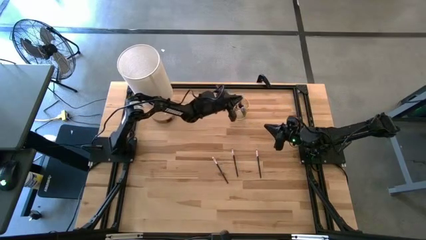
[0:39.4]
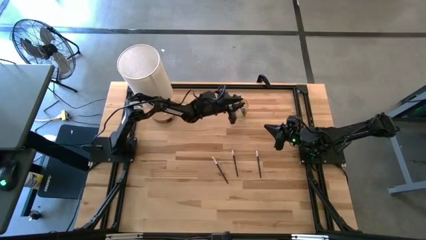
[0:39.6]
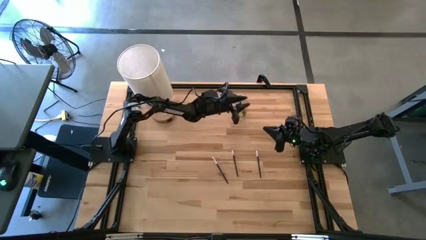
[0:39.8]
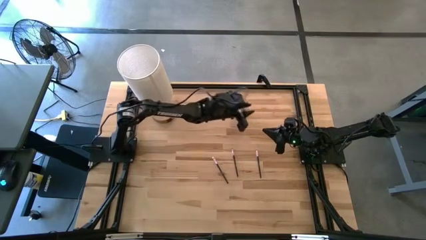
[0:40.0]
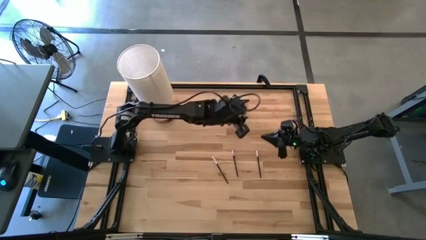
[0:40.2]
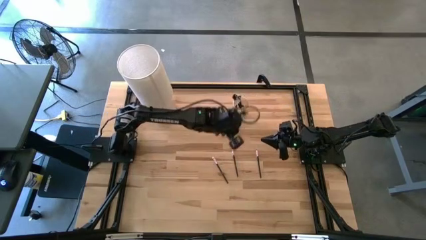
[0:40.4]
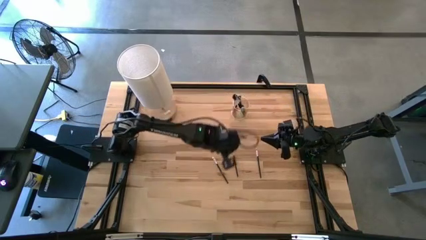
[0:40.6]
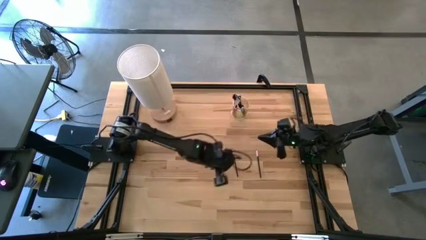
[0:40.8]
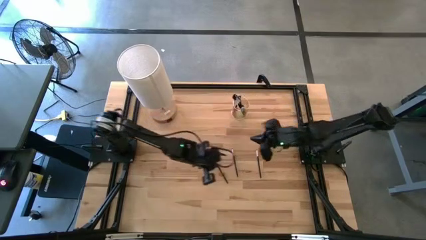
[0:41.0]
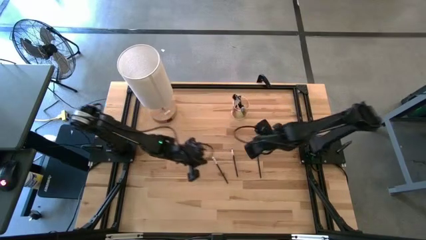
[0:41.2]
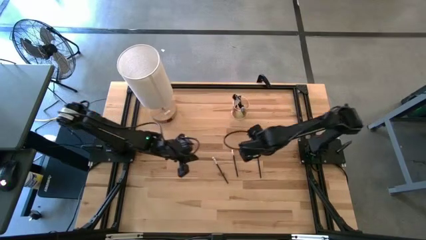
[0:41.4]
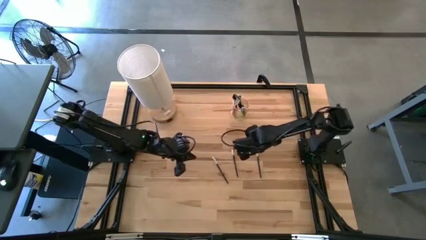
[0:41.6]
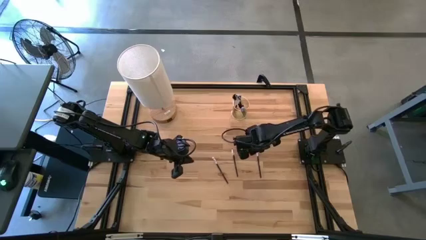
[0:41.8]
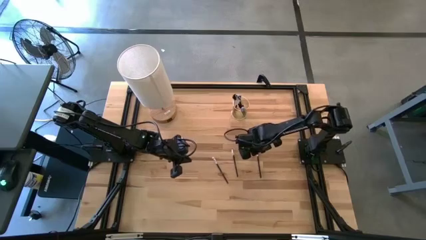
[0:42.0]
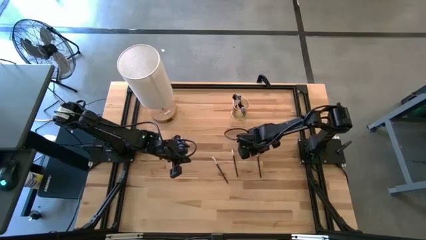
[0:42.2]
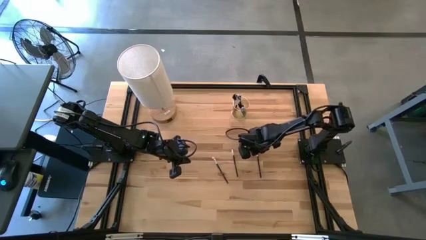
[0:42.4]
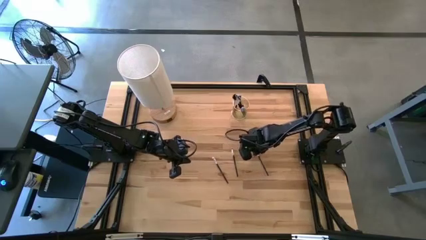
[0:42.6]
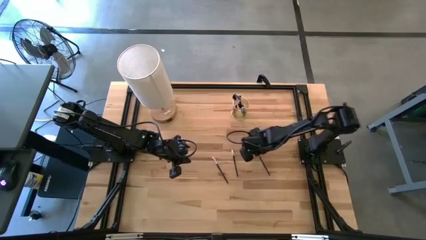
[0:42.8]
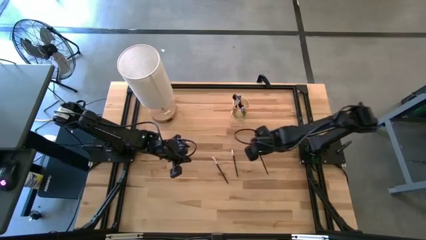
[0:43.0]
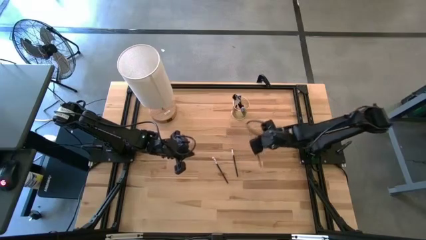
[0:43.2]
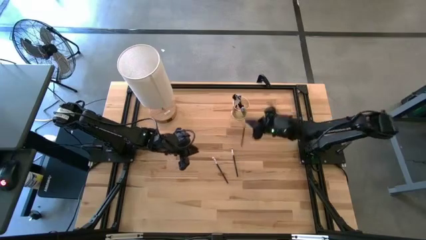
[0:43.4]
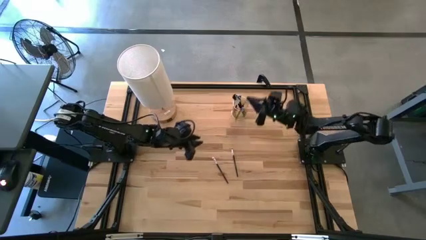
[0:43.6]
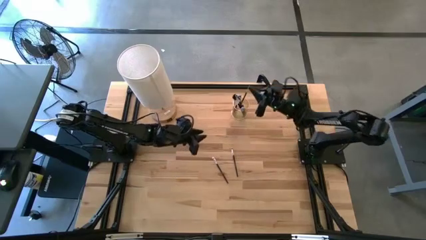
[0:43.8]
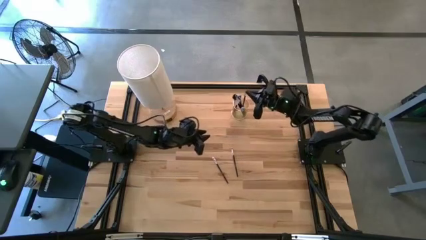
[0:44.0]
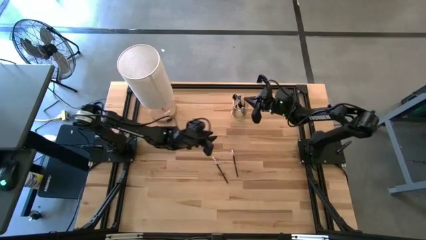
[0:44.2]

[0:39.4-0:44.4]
Task: Put items in baskets/containers
Put the silver eyeshadow brush into the yellow container

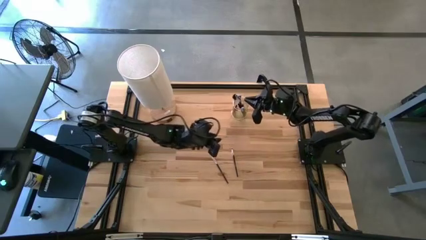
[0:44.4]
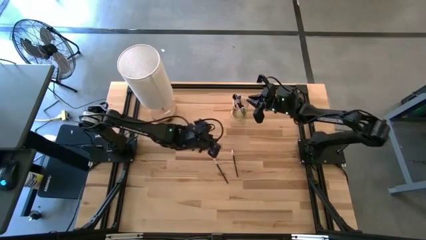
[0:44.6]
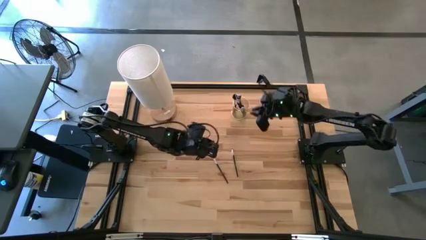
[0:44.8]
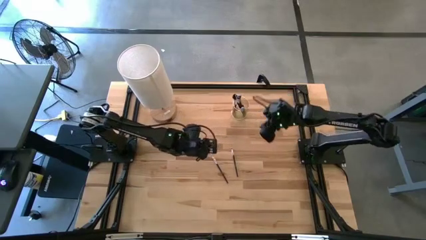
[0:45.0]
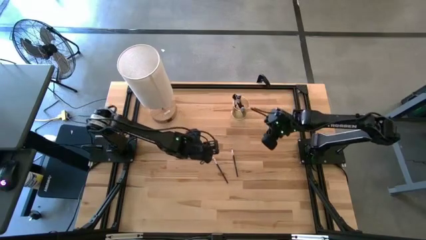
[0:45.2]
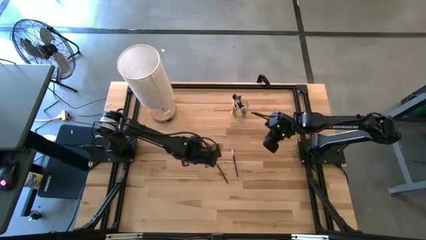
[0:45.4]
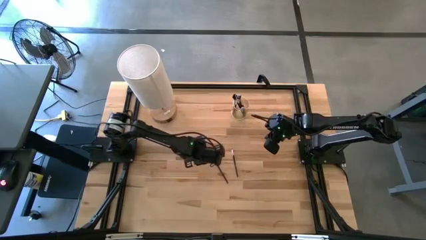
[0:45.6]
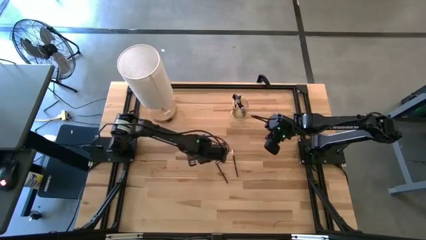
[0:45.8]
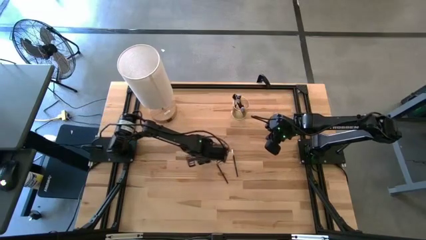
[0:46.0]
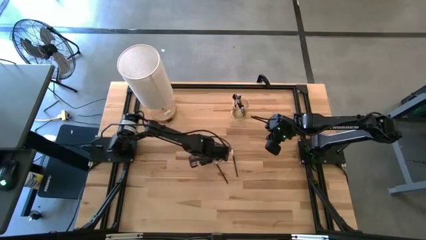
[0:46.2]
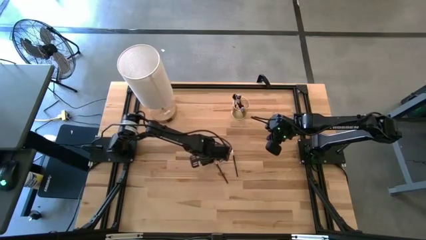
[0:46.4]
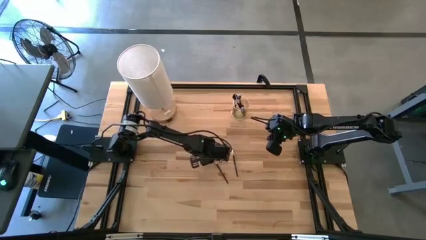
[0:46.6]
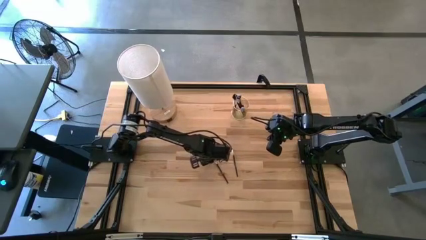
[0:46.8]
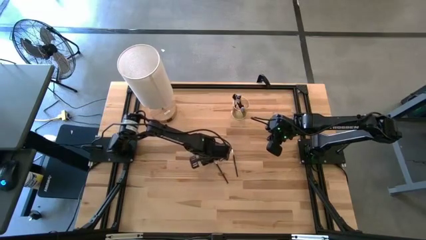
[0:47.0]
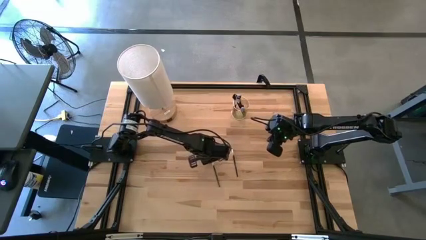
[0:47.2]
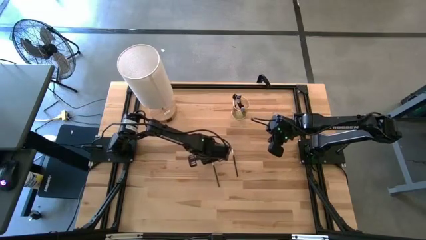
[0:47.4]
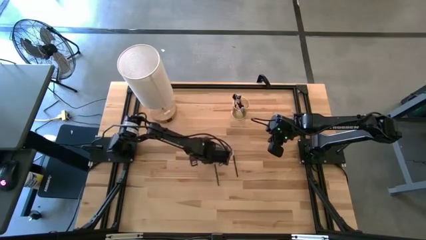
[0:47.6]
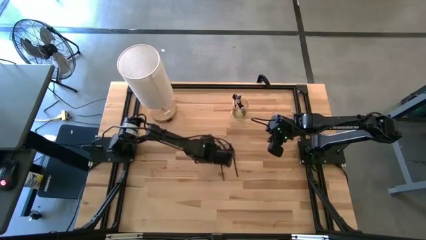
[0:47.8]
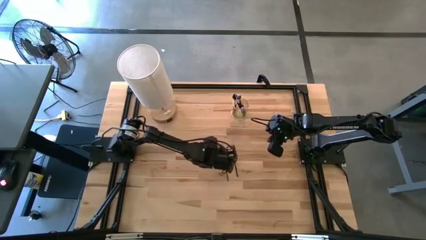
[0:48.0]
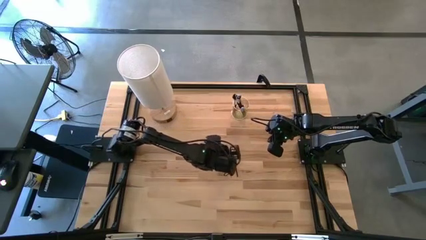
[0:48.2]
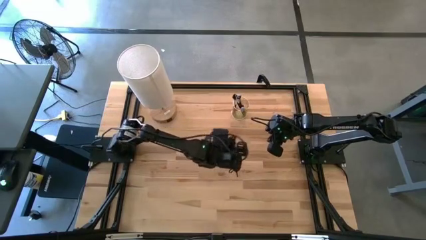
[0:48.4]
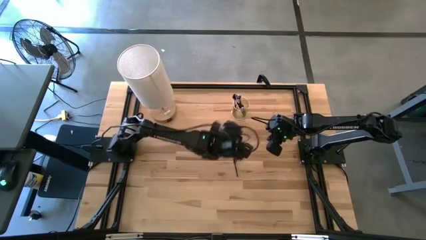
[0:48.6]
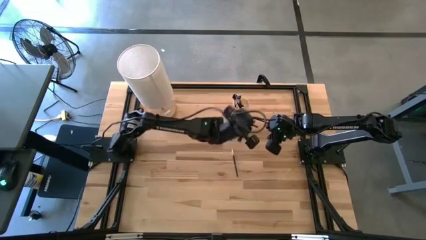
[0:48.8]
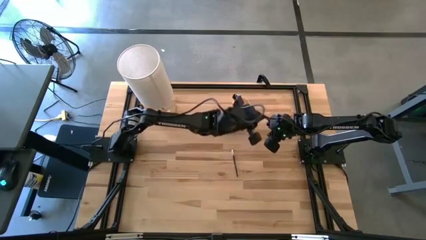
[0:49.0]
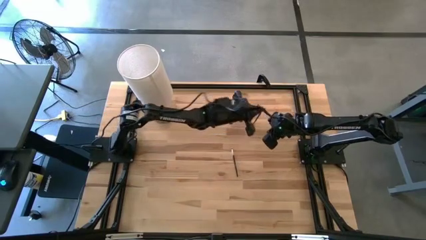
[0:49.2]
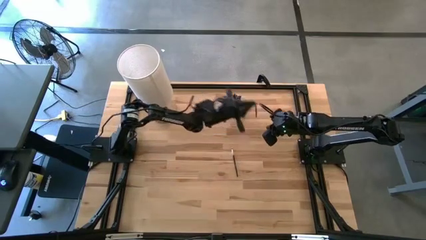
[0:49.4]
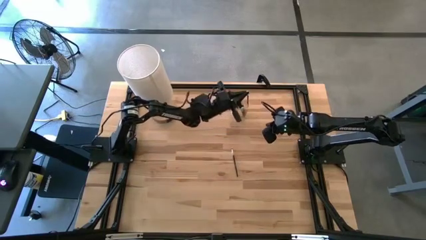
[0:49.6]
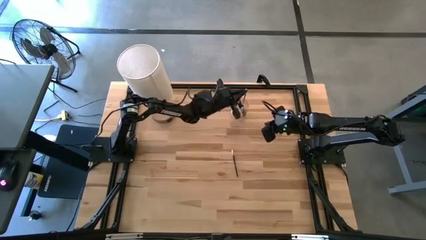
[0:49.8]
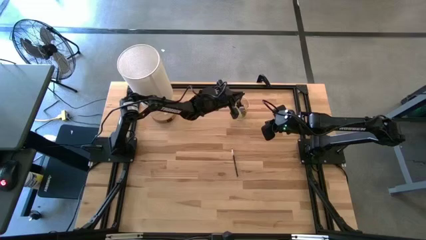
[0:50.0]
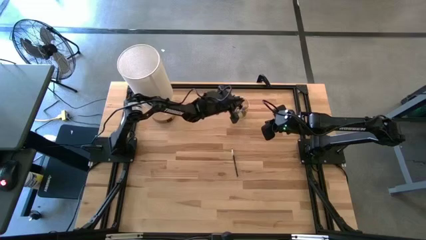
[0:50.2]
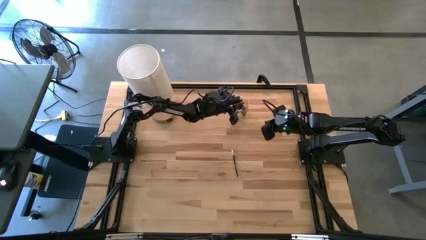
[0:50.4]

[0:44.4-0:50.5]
Put the silver eyeshadow brush into the yellow container

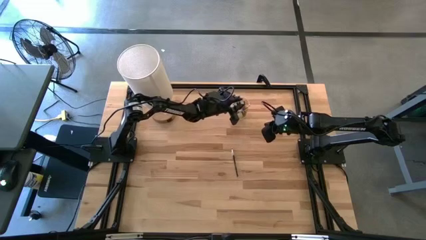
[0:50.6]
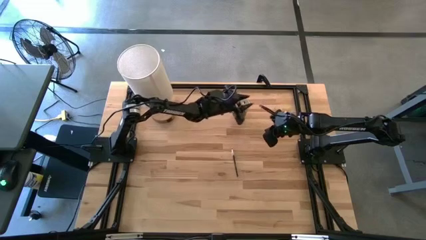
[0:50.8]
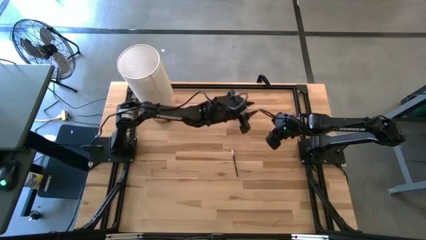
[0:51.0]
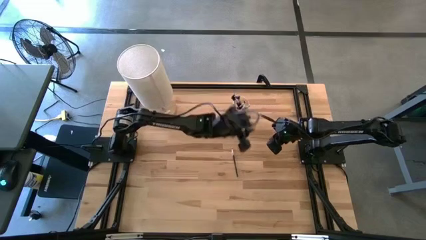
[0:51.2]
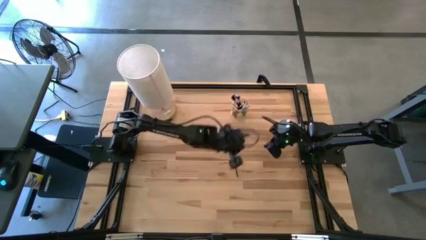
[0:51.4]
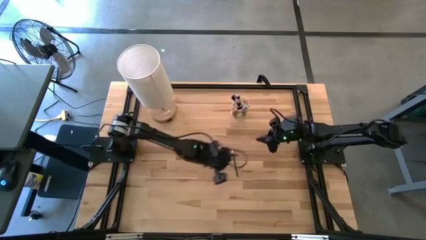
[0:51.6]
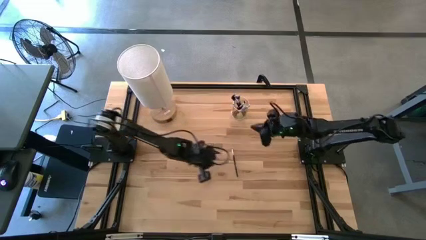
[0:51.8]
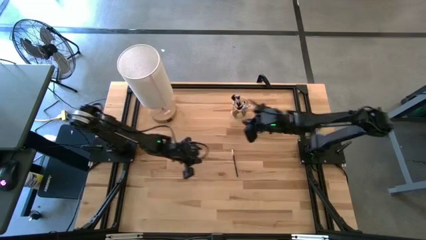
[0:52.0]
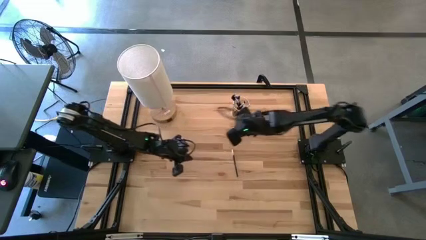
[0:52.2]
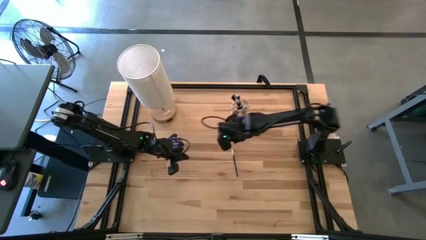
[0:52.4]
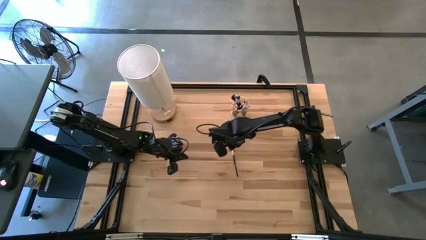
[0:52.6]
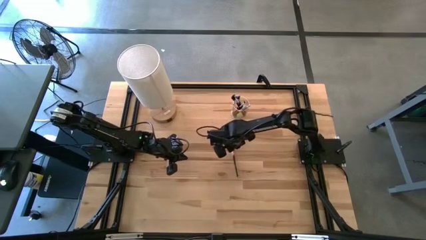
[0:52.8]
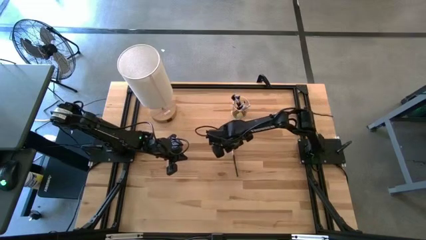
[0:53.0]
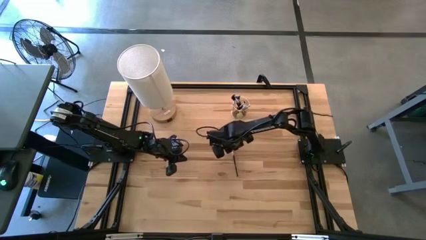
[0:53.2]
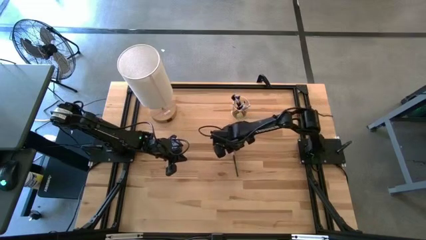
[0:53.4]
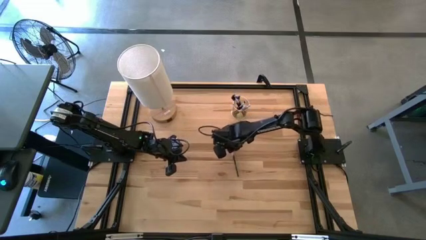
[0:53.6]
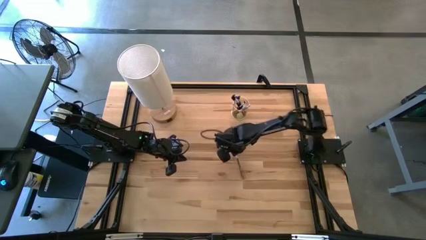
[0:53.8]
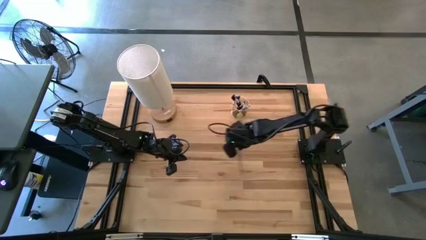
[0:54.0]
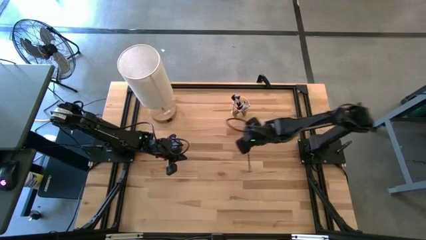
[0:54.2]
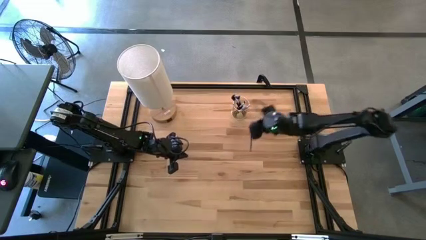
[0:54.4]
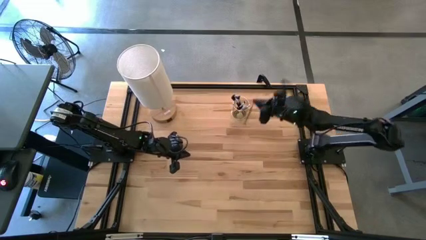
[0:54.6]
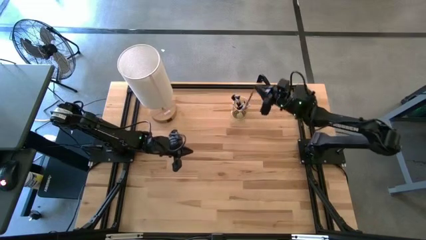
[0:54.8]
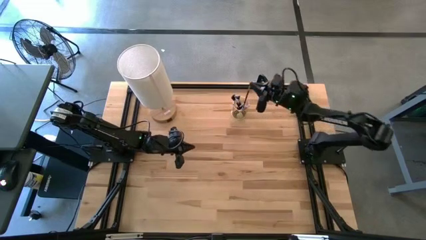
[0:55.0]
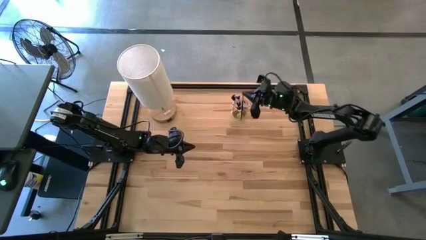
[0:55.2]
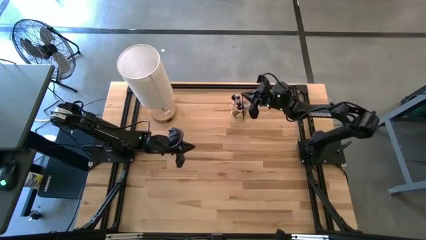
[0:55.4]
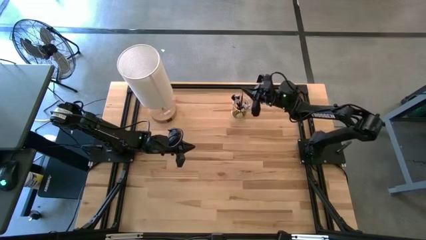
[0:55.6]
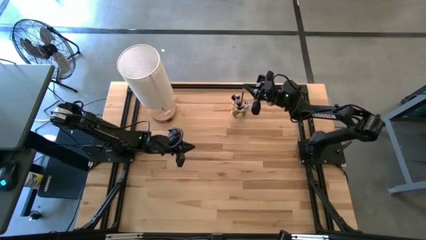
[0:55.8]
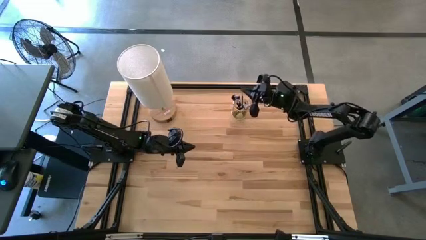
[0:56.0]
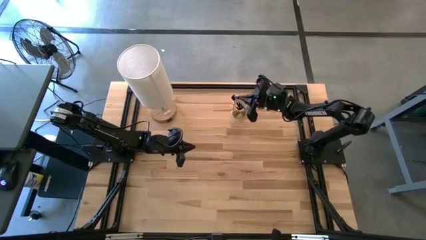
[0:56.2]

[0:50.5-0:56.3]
Put the silver liner brush into the yellow container

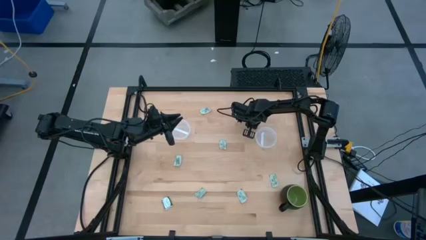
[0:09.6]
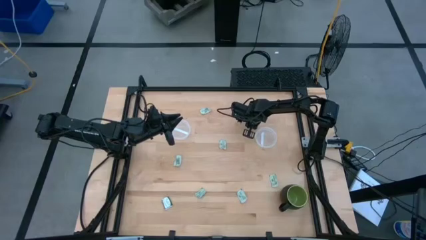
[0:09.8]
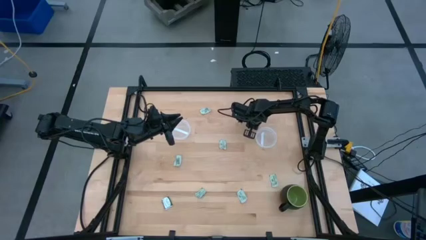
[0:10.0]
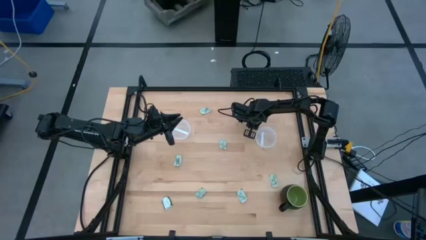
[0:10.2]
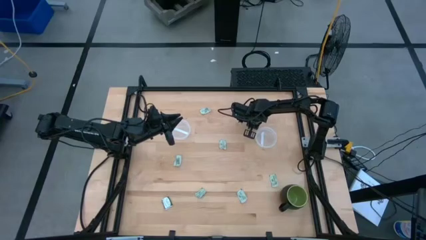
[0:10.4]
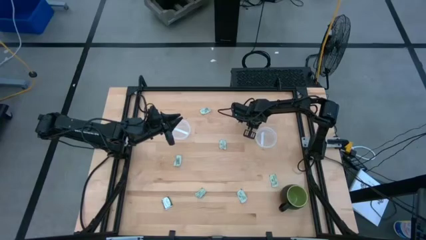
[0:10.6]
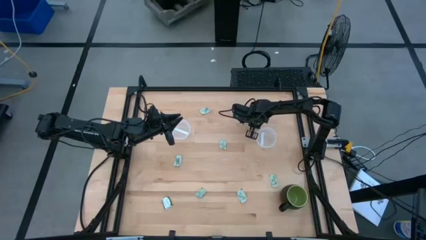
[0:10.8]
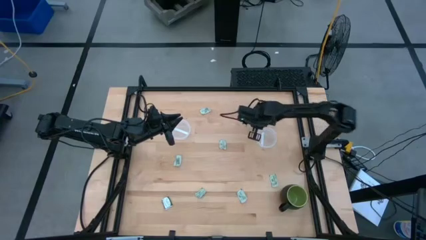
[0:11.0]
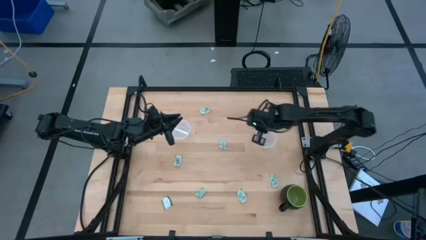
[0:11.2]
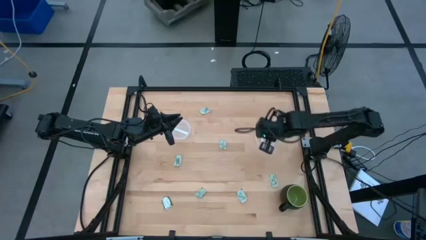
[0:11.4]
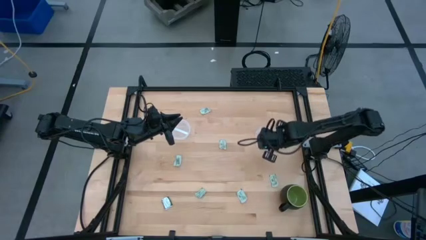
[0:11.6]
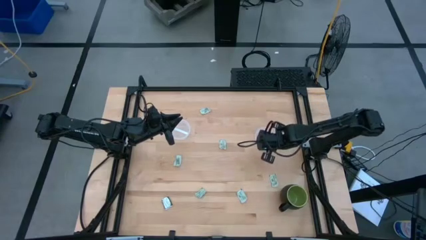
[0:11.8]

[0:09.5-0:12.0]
Task: Pick and place Stevia / Truvia into bins
Put the stevia packet into the right transparent container
